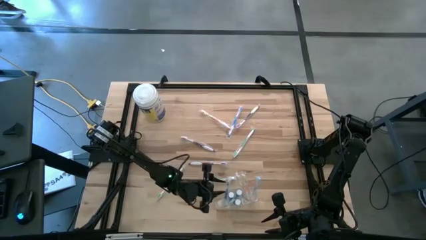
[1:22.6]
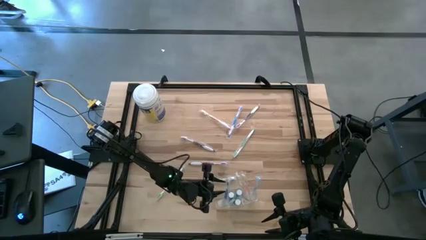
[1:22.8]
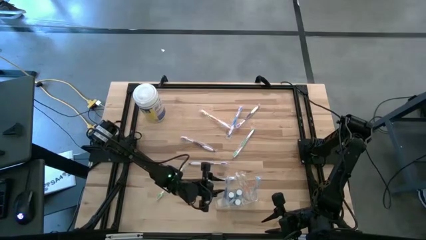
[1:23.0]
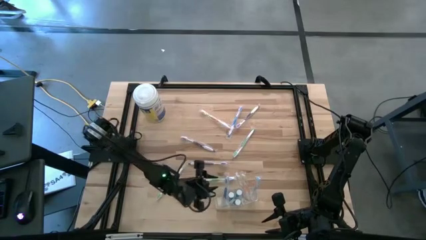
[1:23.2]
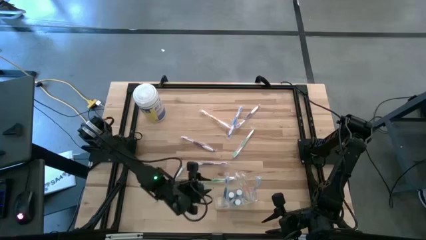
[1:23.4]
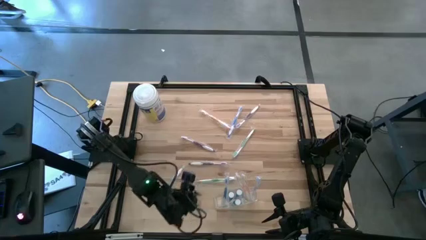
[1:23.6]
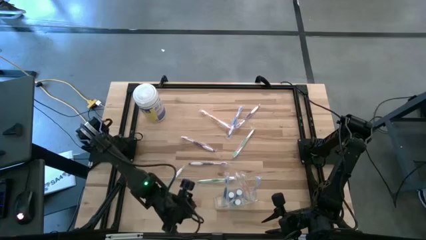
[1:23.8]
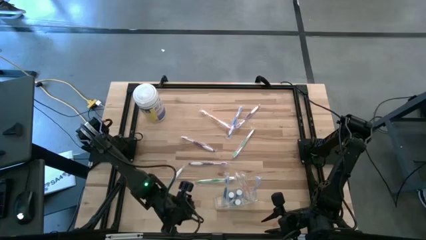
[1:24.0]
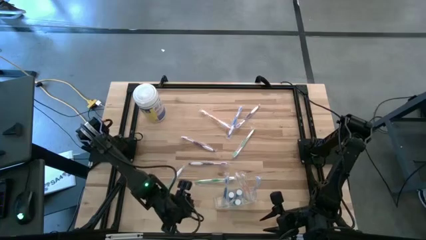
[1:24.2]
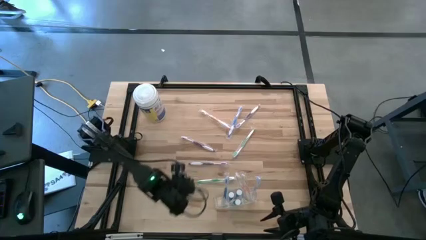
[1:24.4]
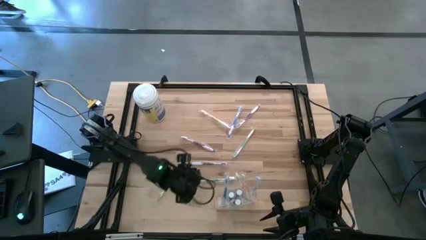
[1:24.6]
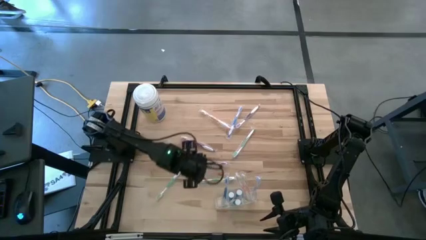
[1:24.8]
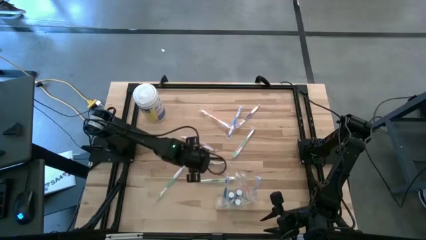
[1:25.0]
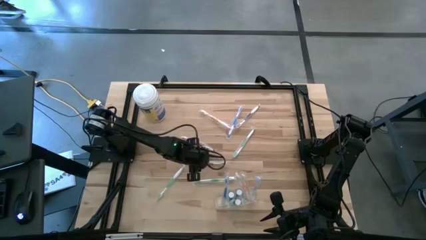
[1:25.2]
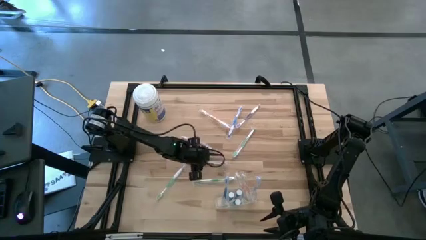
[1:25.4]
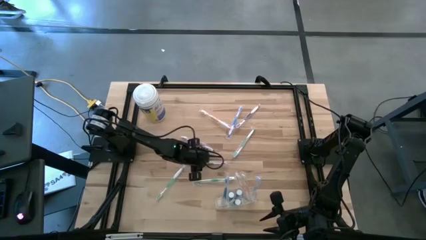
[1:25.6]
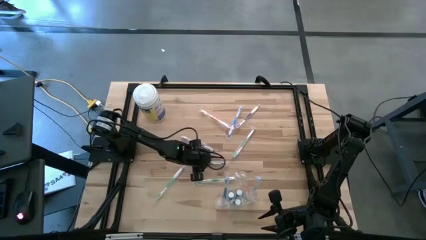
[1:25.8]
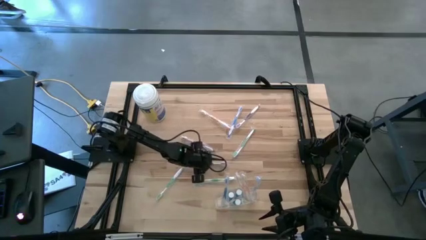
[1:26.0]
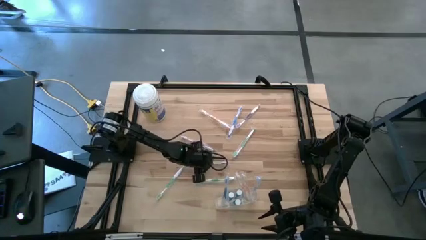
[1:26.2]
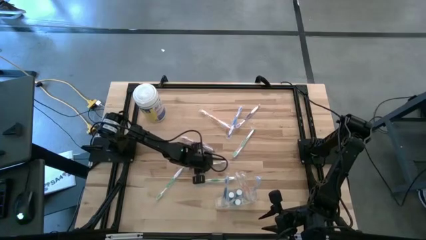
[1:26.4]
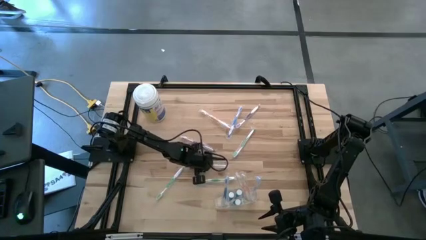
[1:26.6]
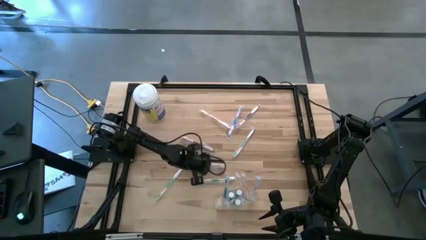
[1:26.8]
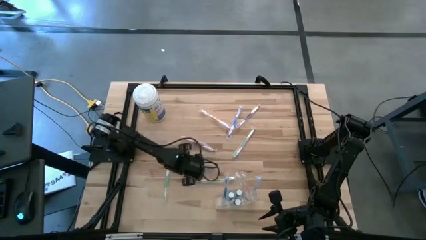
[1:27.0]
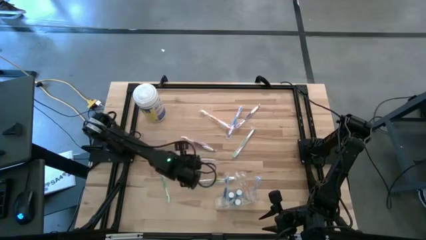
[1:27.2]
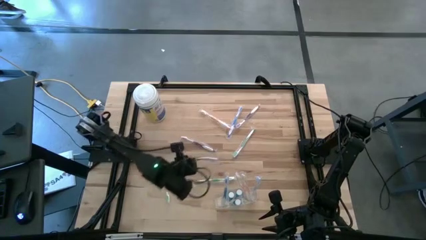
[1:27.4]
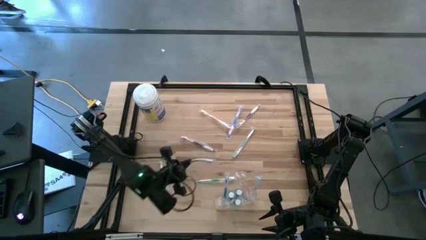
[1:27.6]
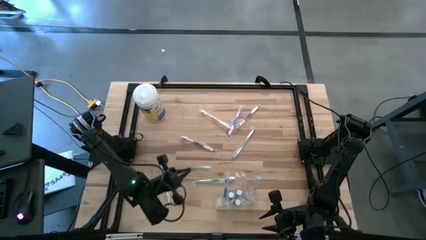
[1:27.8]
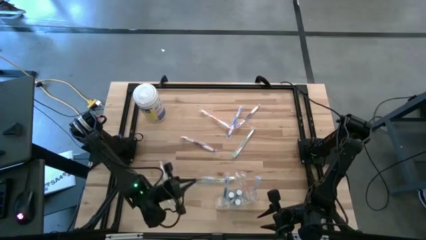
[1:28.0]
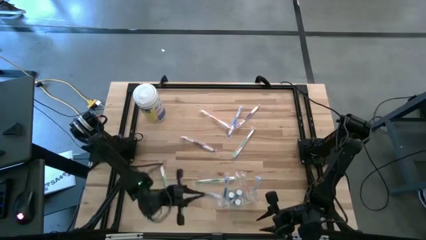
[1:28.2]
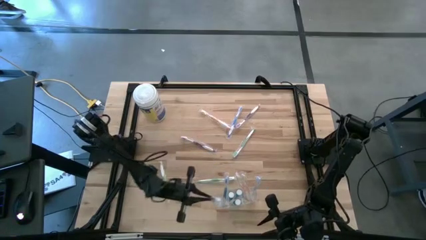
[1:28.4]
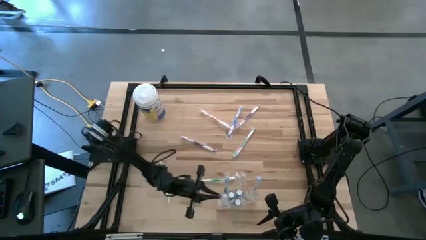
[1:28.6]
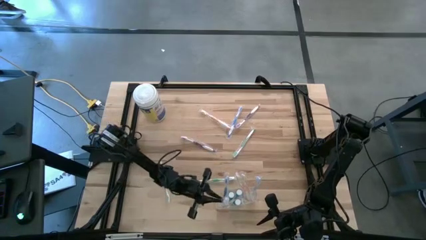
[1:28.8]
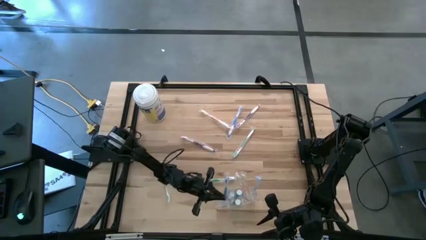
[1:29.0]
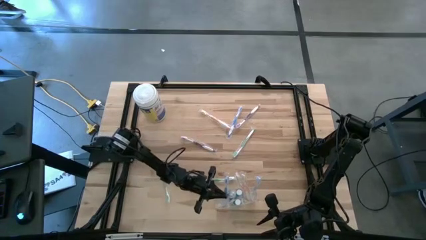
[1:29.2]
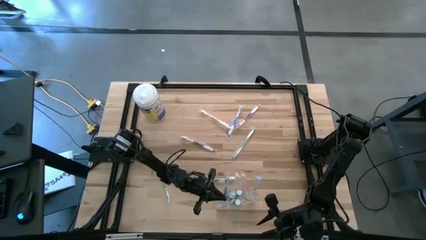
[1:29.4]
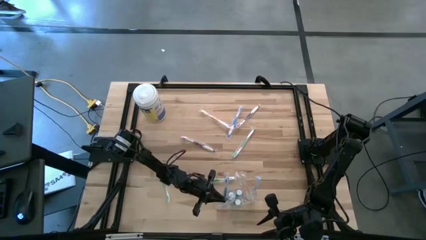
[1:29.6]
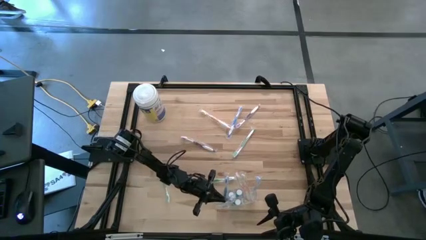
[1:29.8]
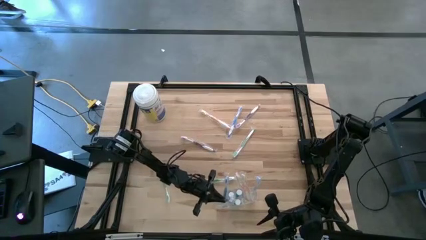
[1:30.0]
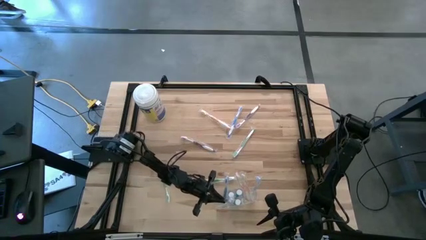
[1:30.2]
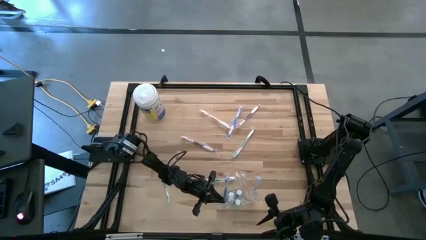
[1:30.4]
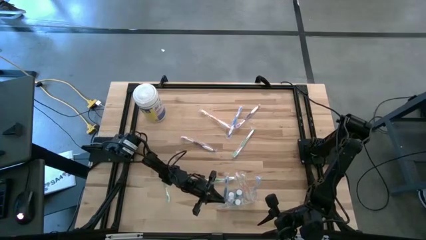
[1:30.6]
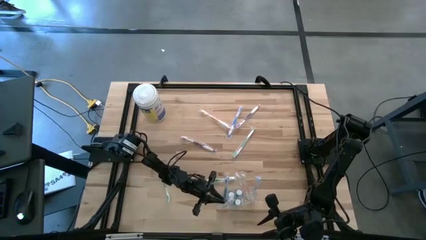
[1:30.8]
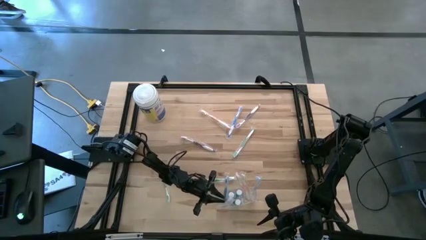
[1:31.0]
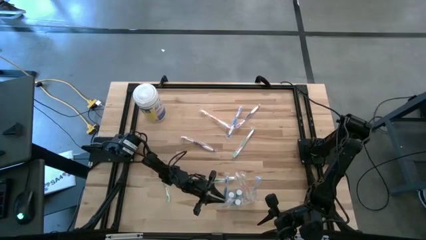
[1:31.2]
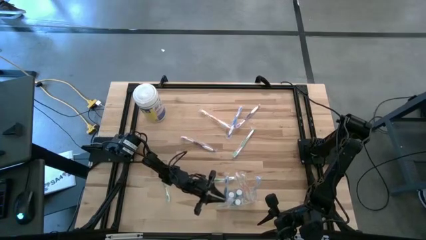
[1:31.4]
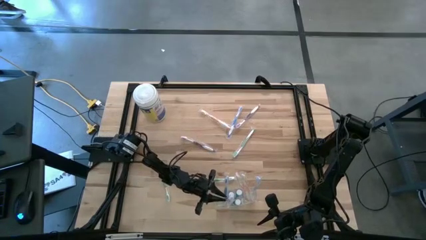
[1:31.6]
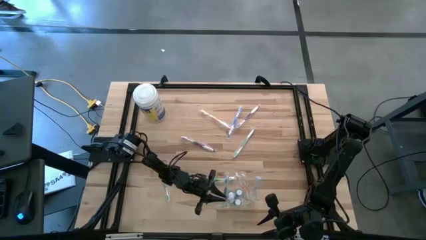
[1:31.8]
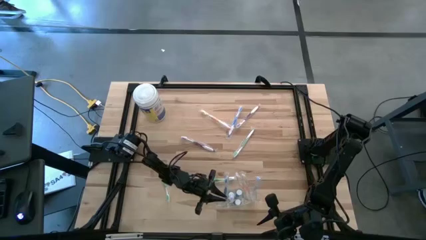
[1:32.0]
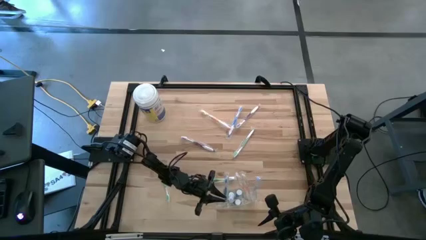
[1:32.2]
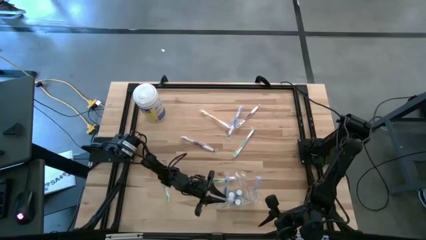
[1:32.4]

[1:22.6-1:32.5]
Task: Pick & Place toothbrushing station
Put the bottom purple toothbrush into the transparent bin
